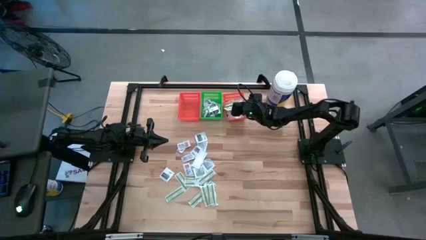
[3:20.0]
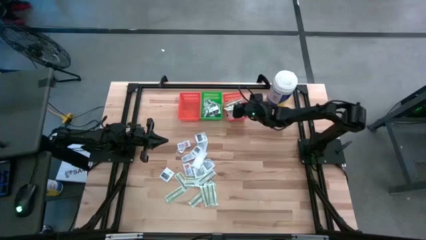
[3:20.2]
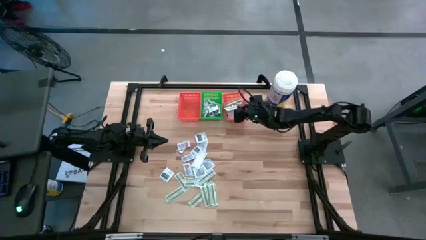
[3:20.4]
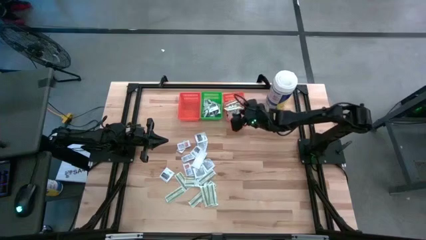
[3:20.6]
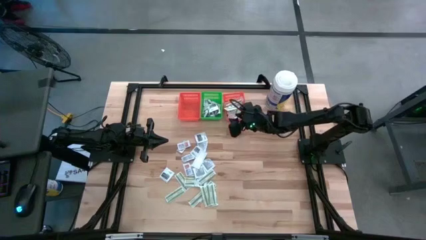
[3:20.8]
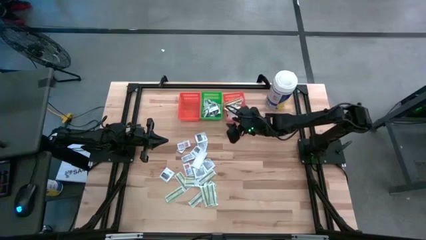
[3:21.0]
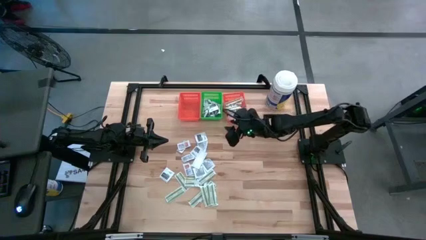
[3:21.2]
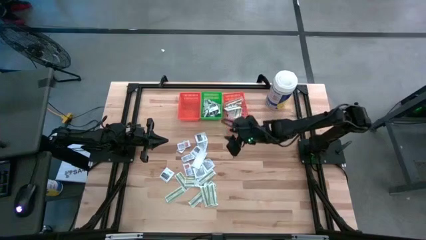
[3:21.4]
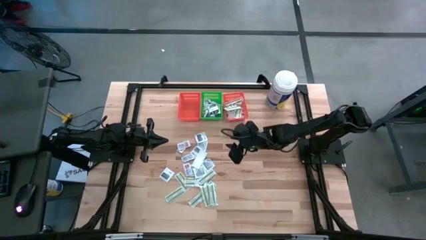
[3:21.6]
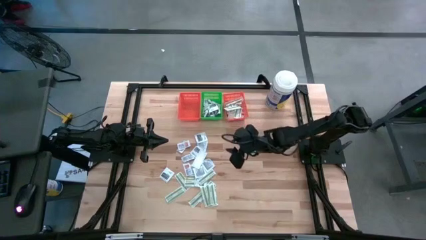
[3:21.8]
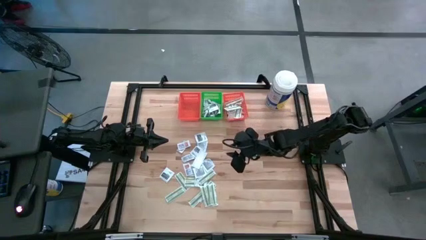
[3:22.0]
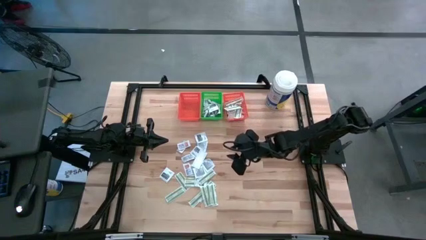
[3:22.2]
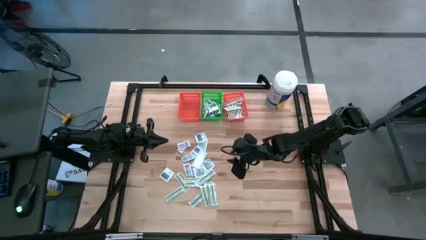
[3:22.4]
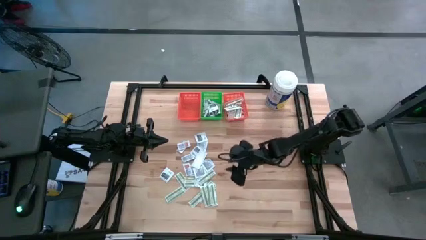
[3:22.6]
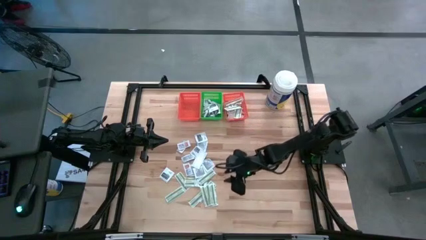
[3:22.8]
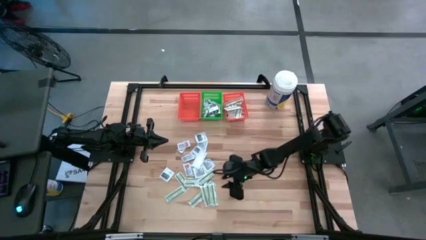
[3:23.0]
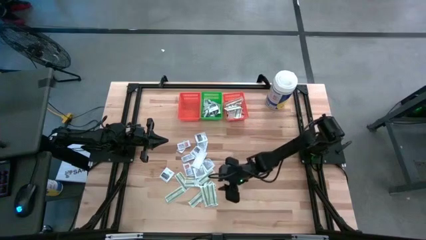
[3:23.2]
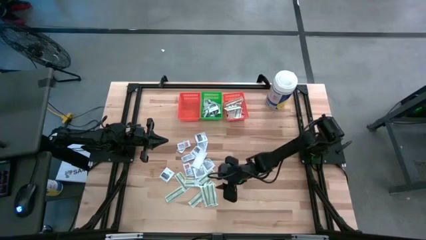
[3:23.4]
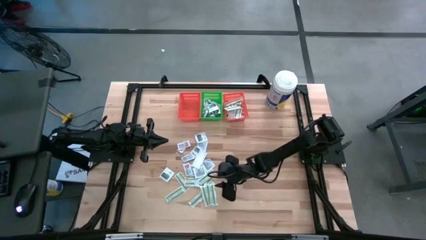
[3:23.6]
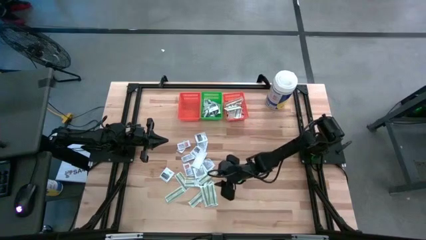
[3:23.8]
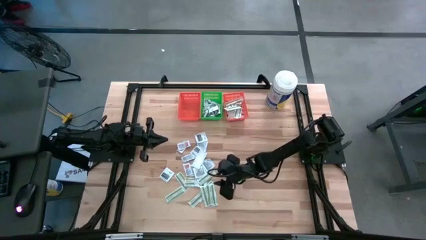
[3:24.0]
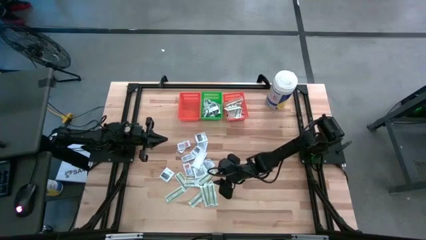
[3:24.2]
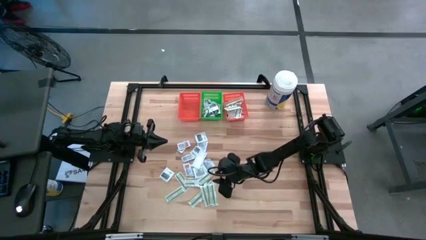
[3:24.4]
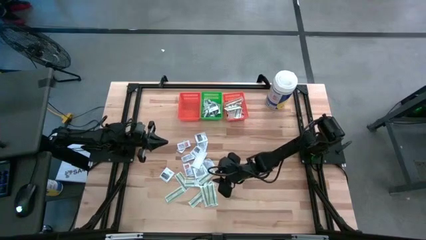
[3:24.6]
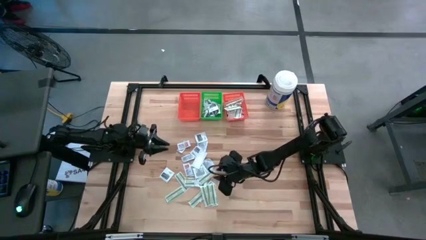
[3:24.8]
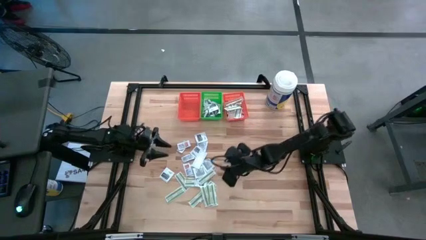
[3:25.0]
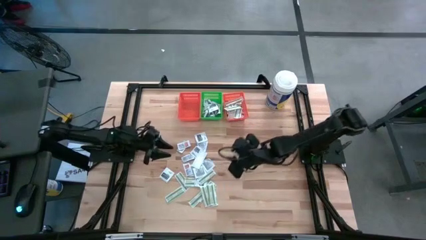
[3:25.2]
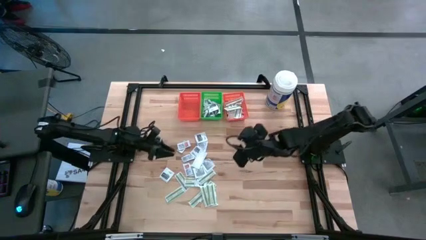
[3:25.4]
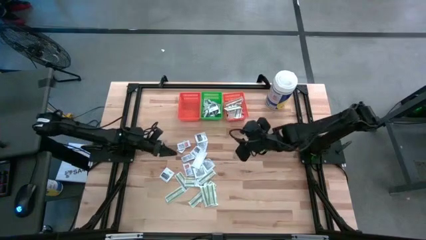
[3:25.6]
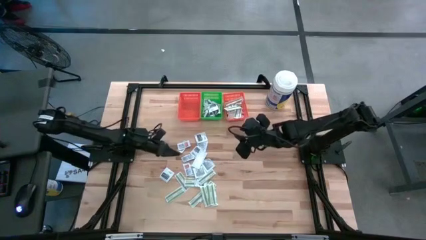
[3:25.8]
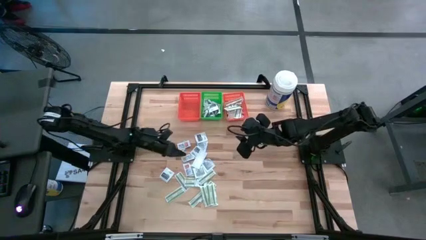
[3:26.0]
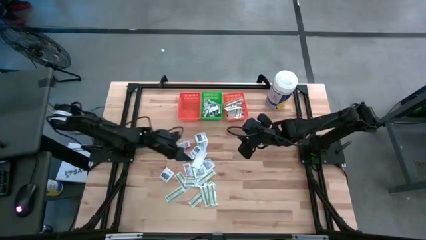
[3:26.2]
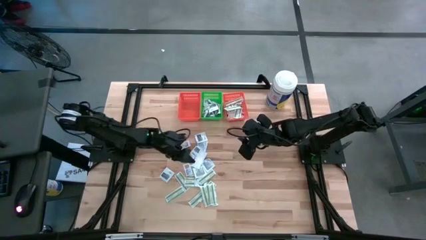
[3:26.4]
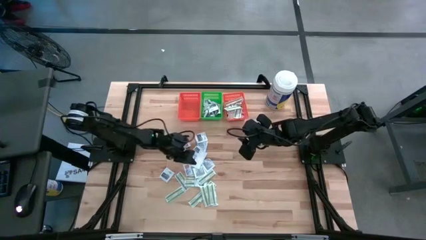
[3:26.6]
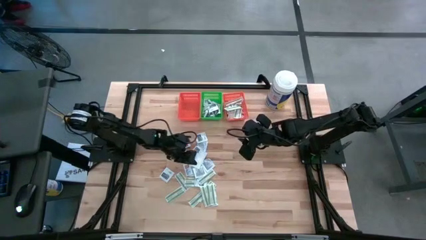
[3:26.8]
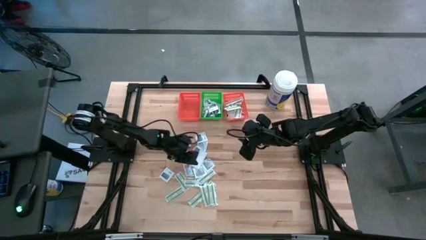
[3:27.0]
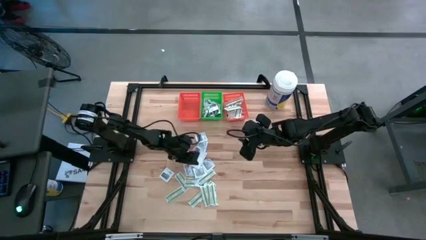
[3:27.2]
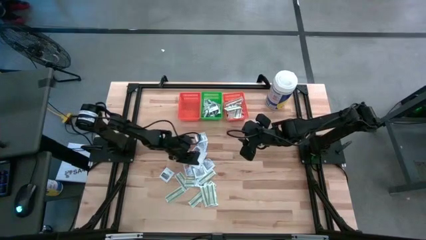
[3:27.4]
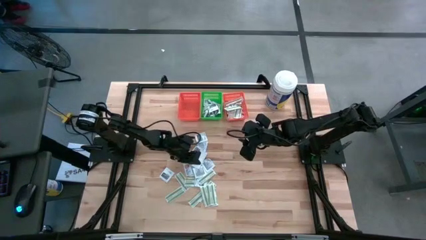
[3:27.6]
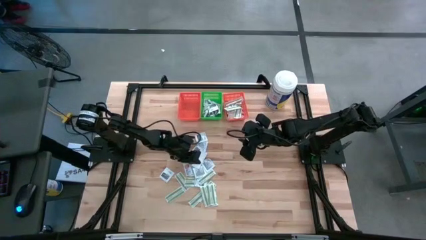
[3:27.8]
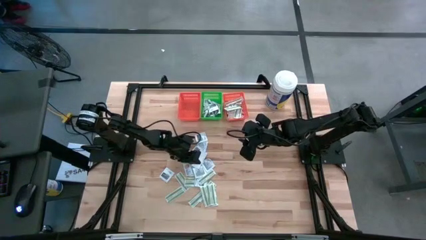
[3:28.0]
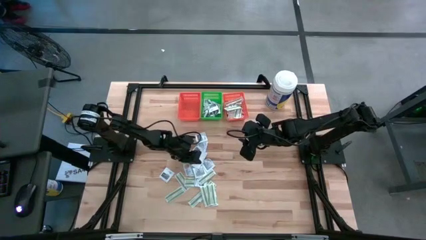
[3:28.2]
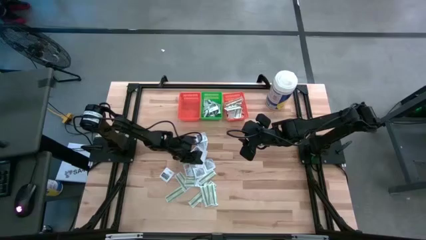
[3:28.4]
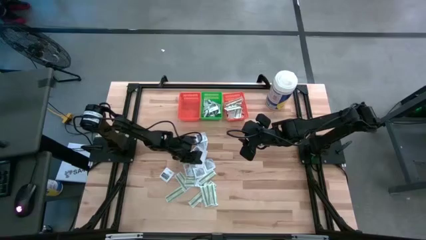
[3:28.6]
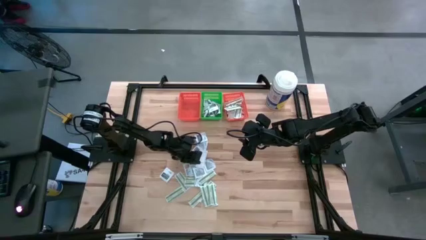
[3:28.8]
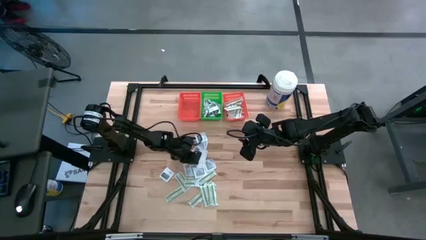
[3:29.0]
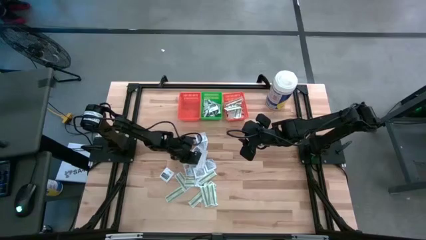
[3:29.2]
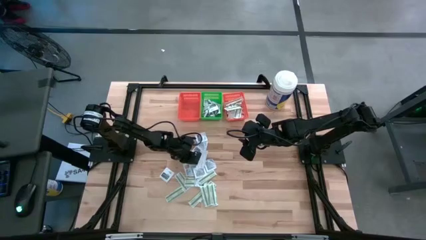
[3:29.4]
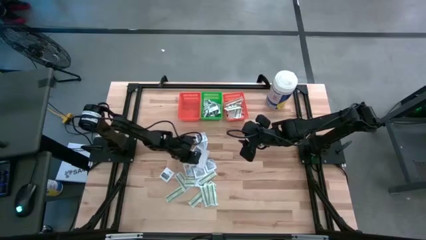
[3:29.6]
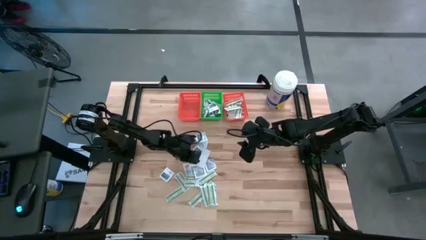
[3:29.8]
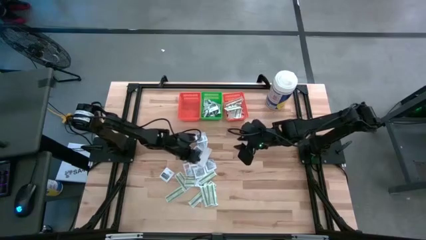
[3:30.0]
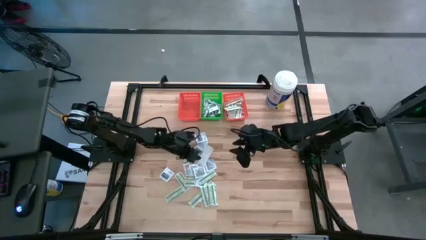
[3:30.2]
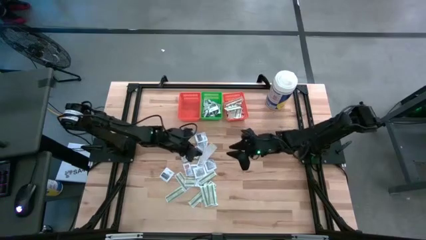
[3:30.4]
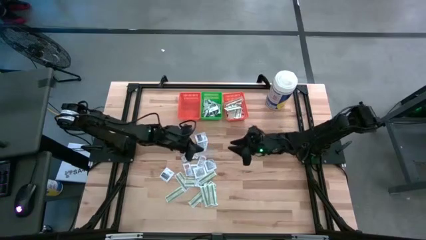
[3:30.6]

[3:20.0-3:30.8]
Task: Pick & Place First Aid Supplies
Put the bandage pack into the right orange bin
